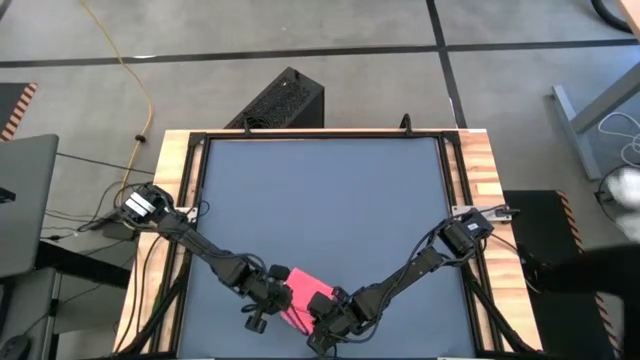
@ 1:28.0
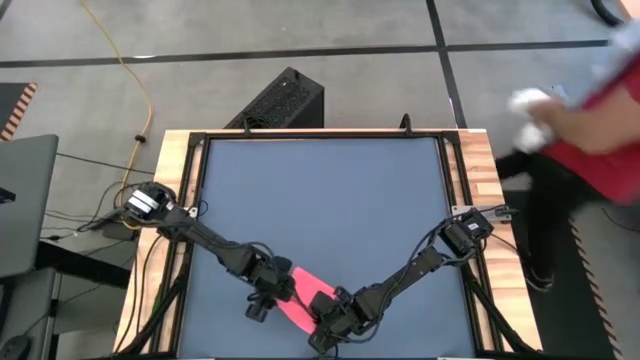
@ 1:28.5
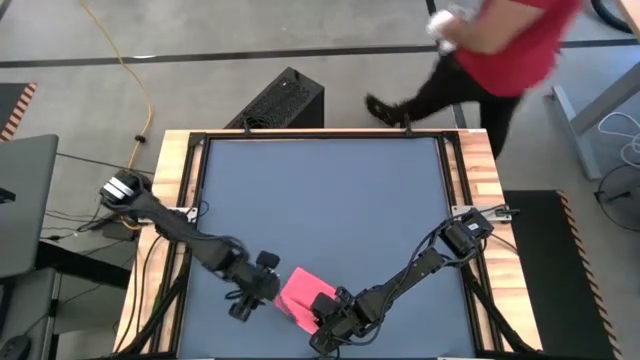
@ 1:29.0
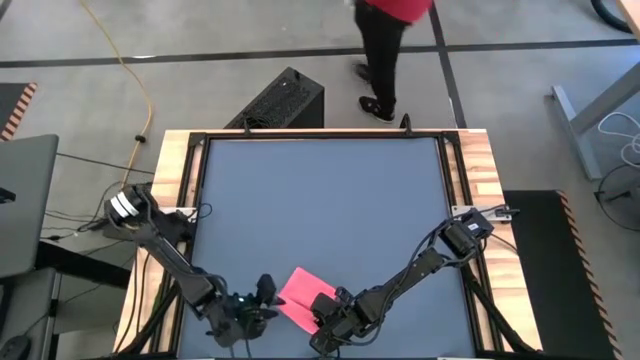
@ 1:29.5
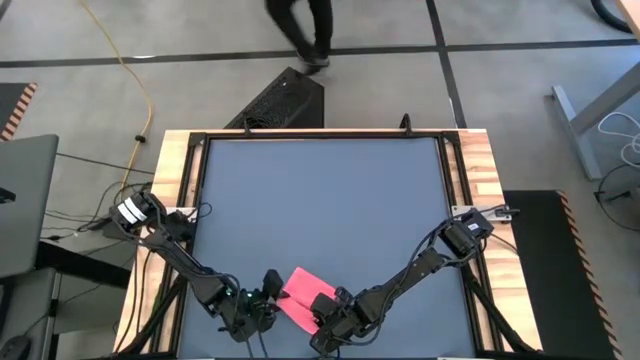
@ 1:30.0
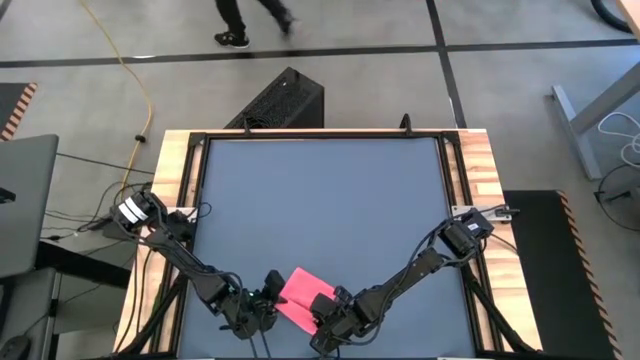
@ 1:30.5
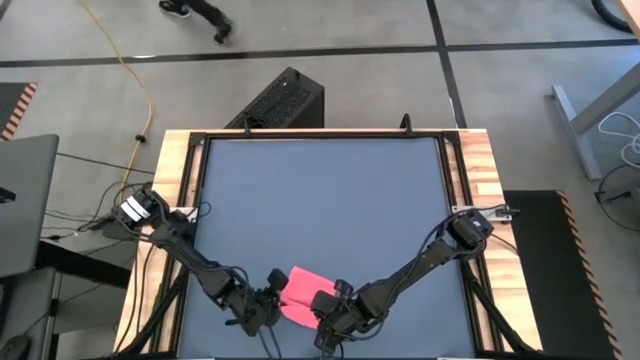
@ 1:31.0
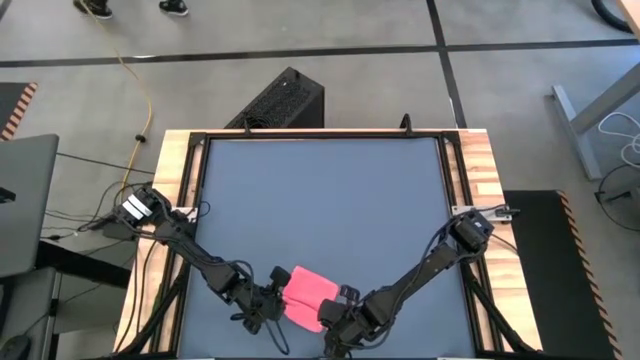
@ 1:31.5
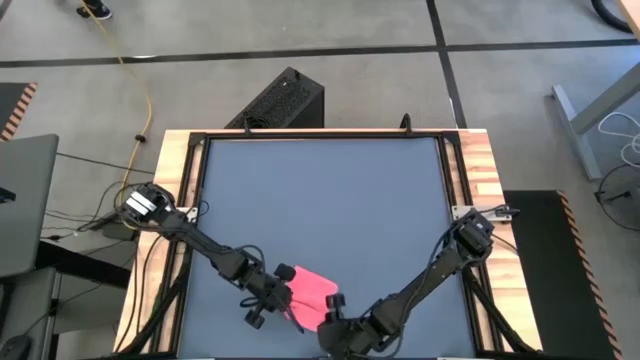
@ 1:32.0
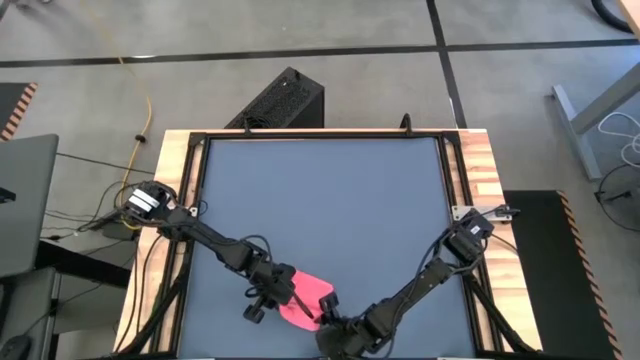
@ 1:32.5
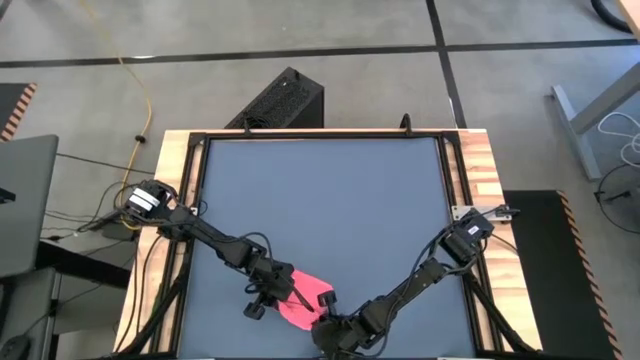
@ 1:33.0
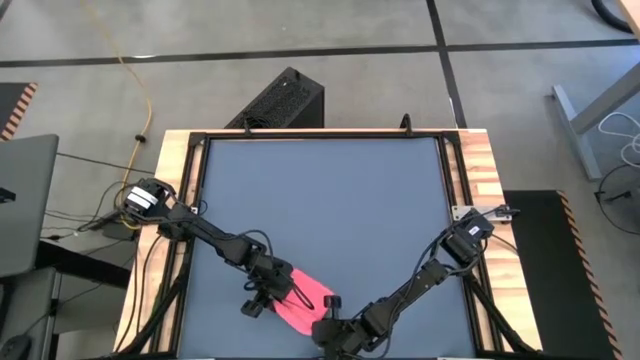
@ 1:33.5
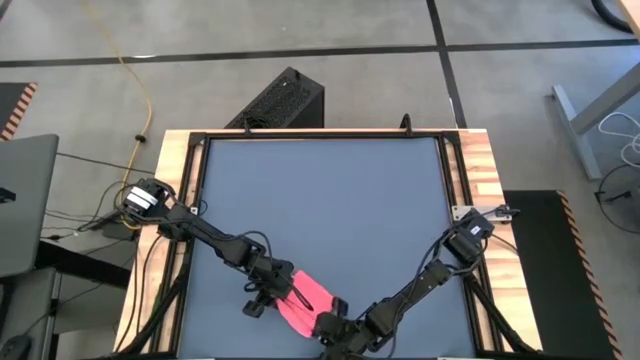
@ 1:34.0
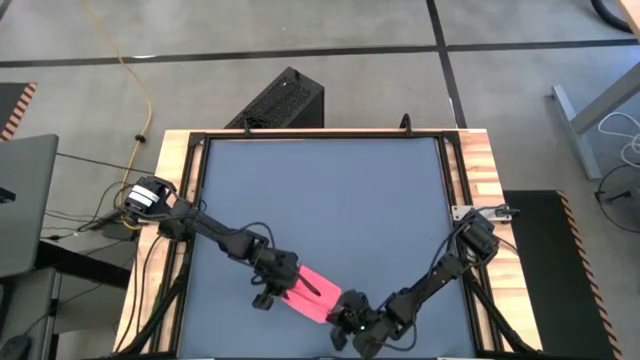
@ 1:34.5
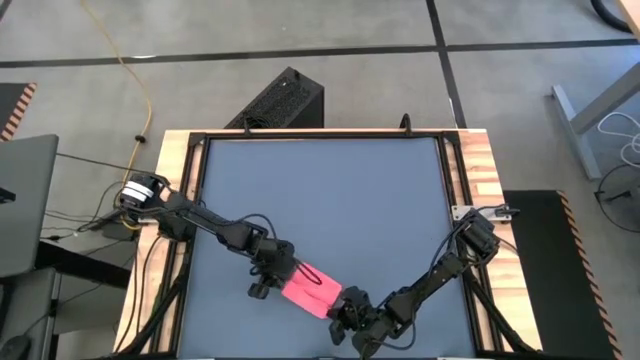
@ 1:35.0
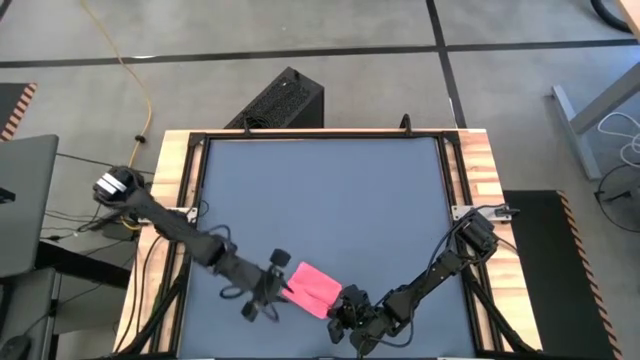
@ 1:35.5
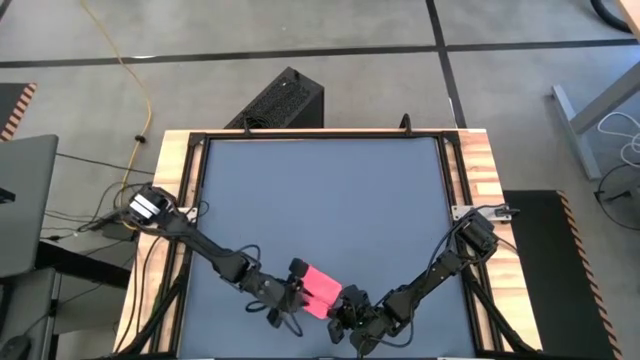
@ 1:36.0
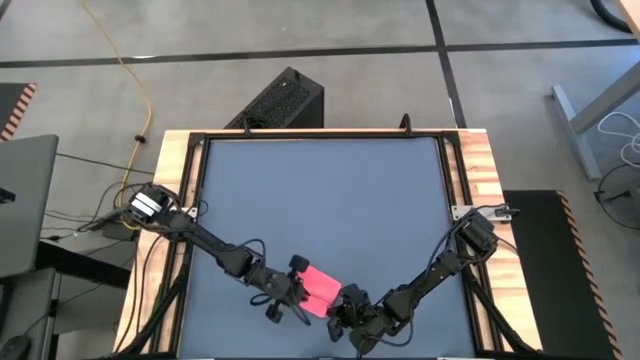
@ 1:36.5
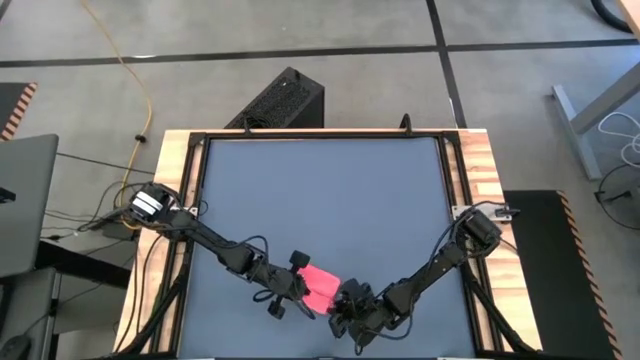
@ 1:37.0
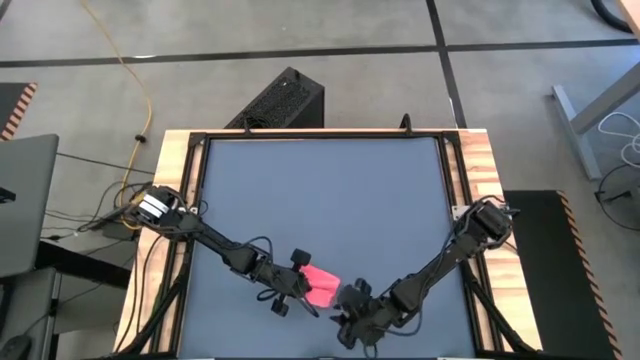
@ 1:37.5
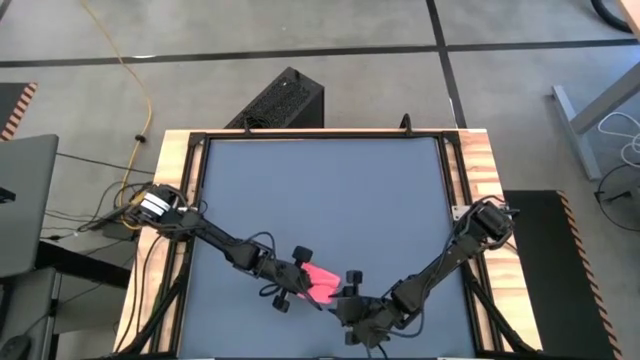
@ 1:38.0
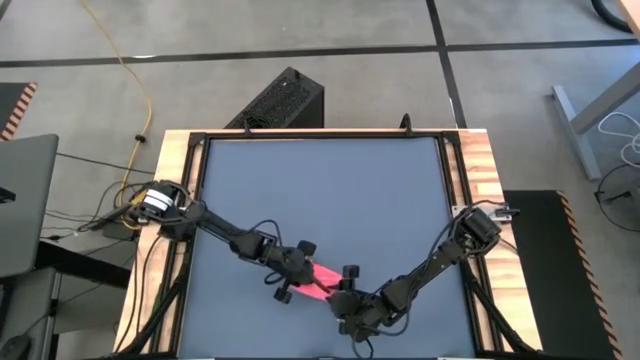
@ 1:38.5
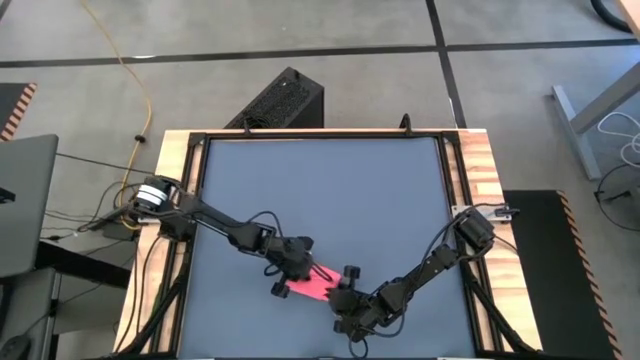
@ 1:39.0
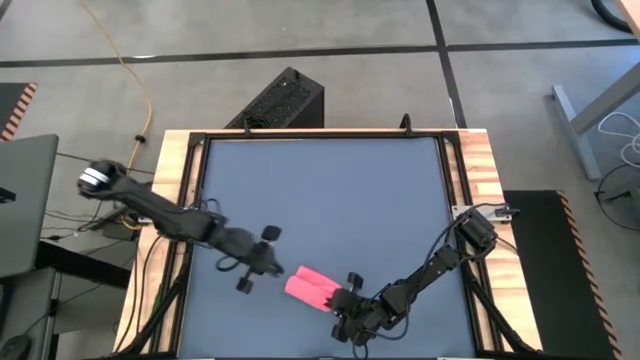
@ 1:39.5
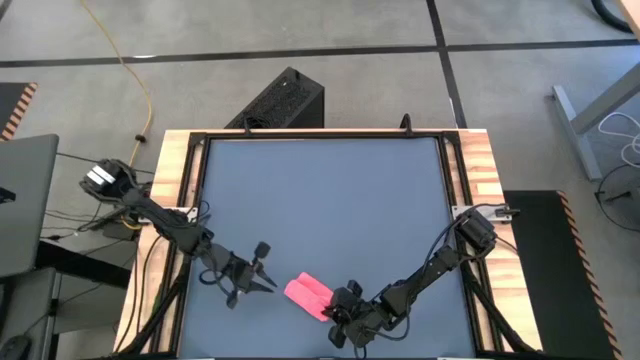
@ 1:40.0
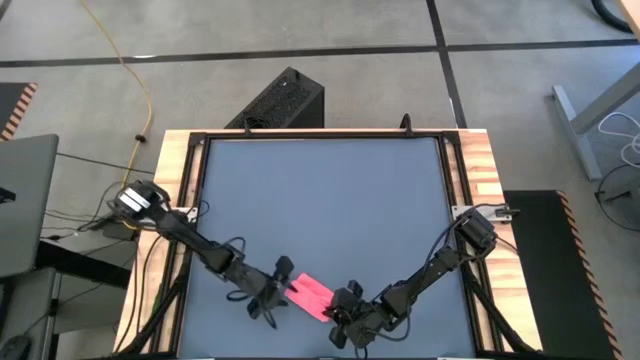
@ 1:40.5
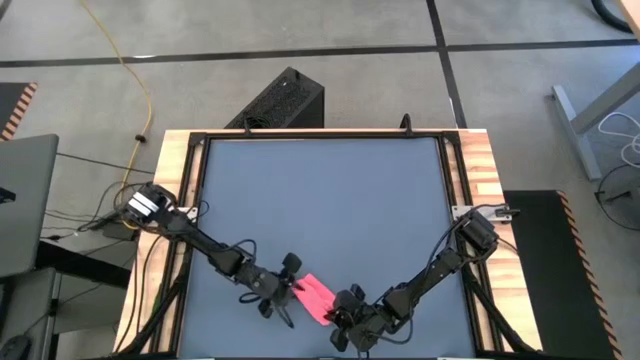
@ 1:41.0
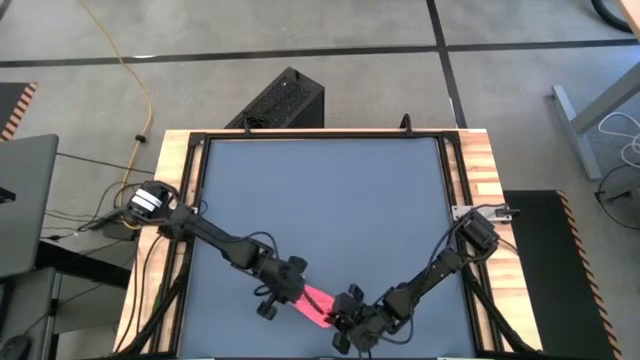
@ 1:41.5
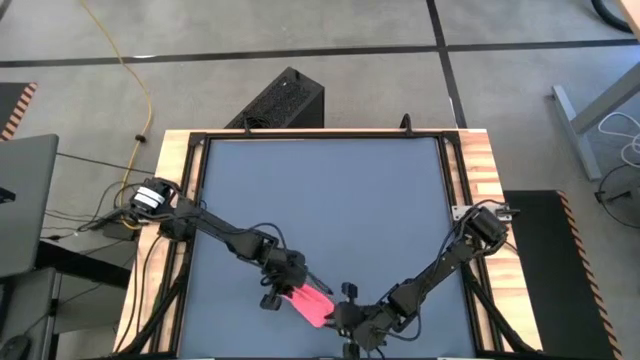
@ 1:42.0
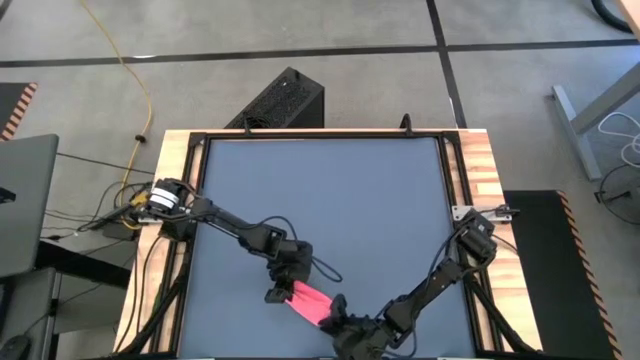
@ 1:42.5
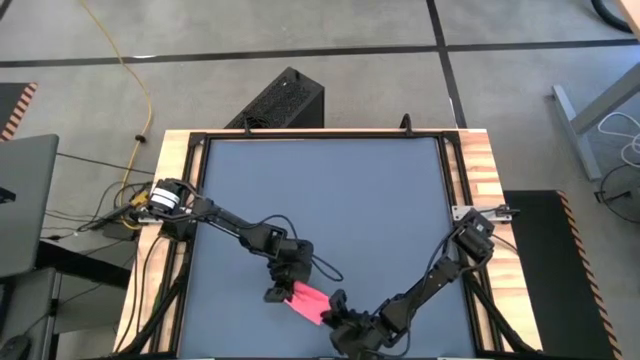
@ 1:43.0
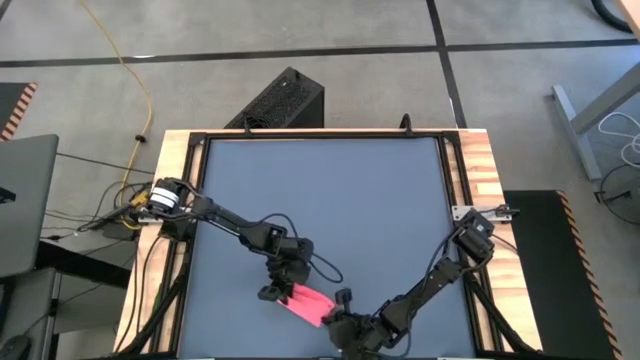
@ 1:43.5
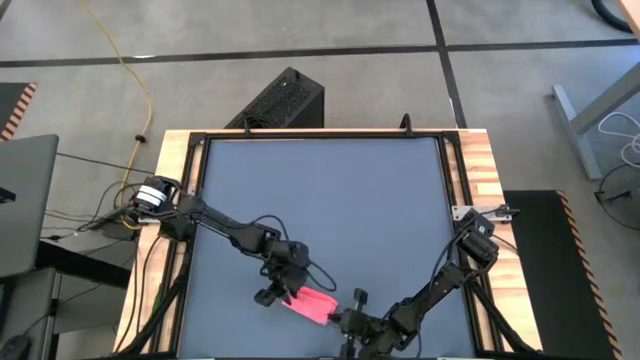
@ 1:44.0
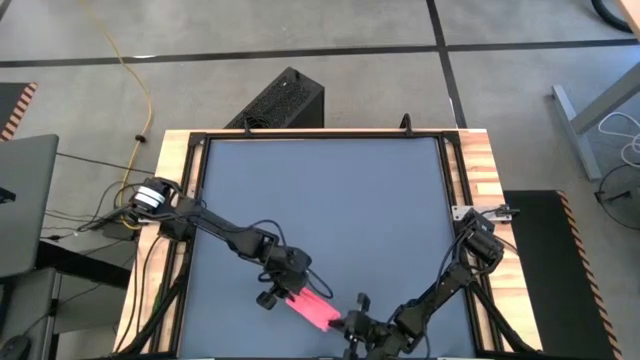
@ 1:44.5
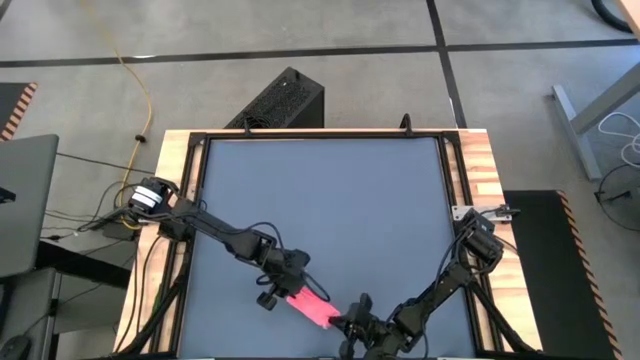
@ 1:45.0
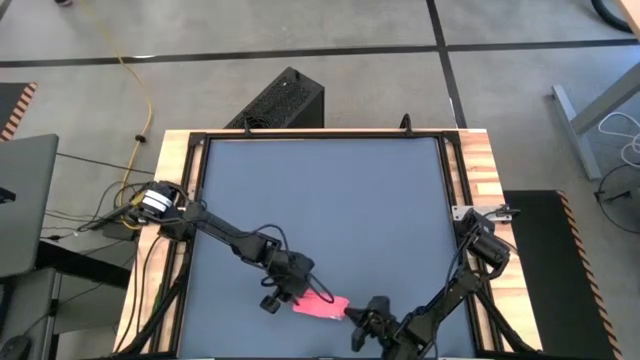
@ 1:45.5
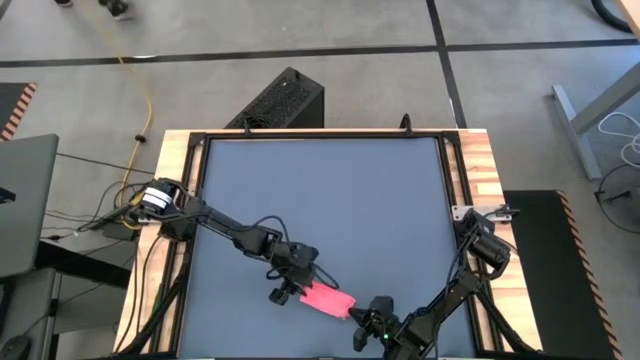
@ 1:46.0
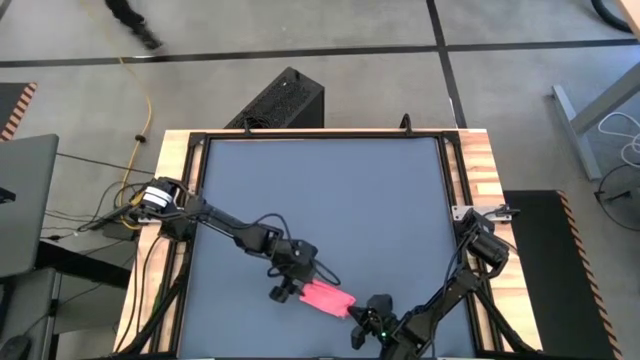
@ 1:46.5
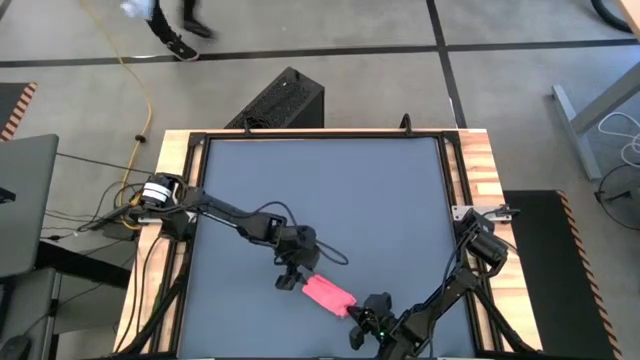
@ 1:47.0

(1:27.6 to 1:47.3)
Task: Roll towel
Roll the pink towel
